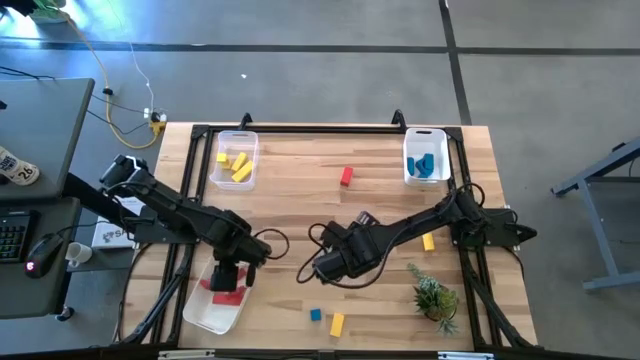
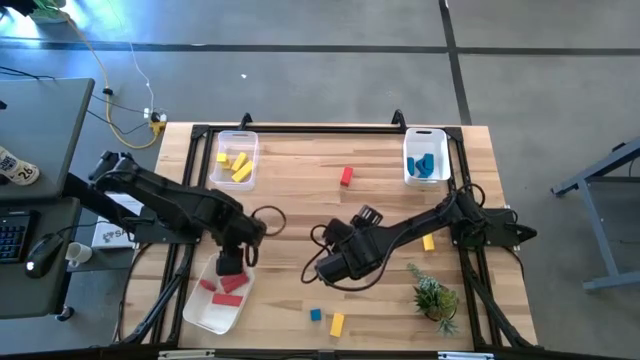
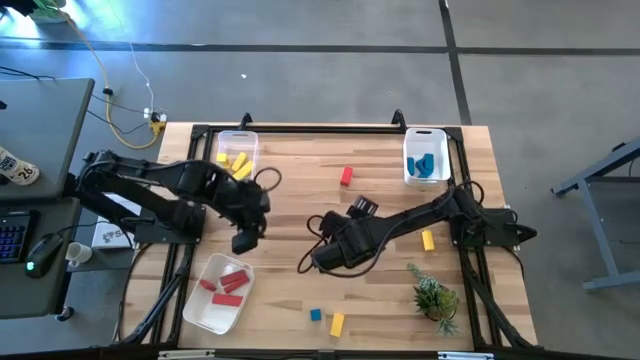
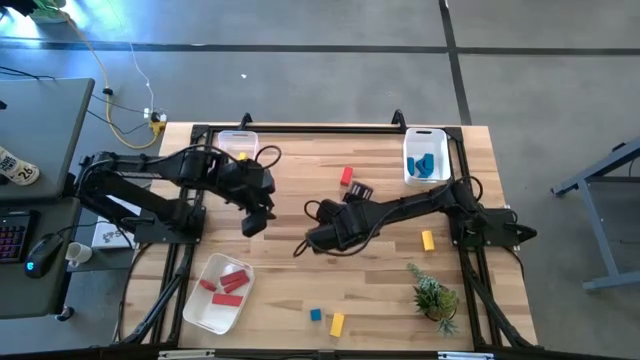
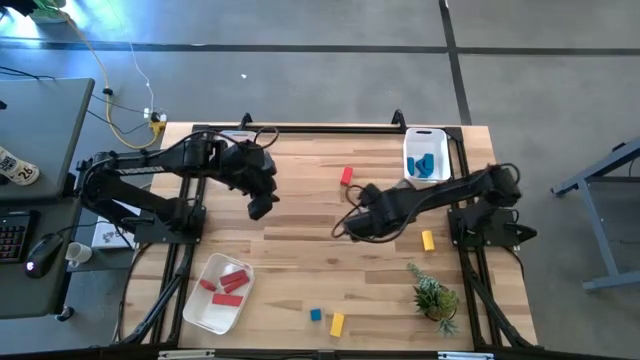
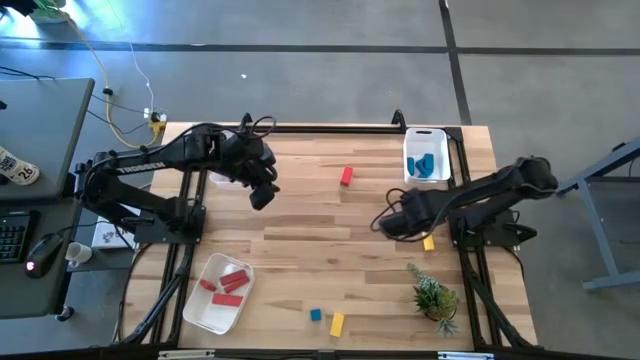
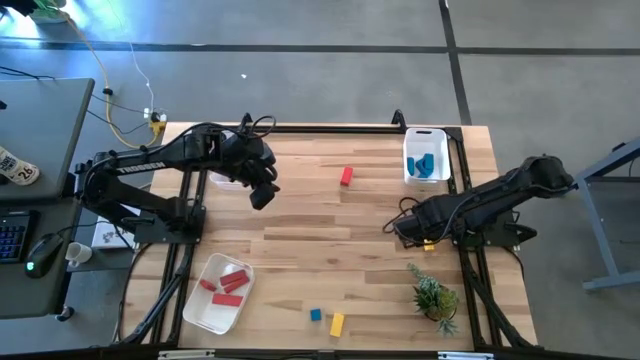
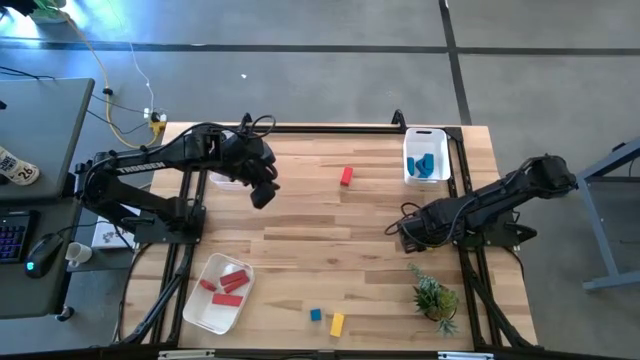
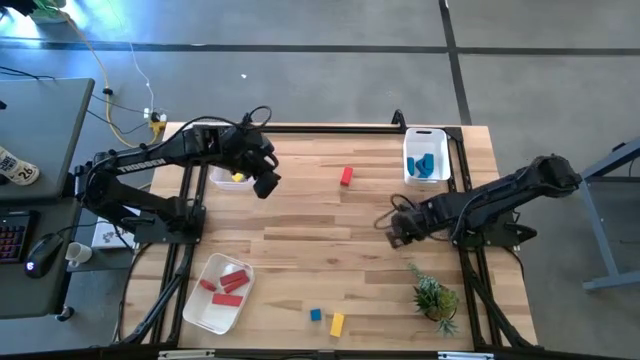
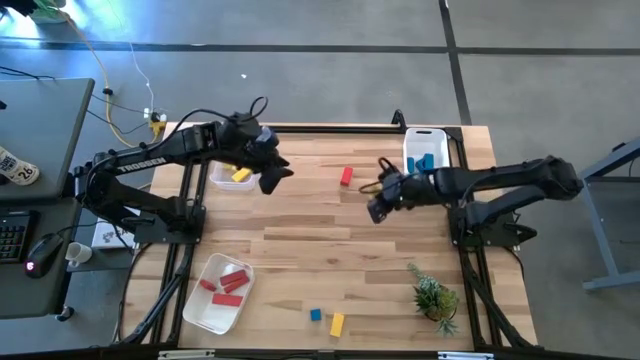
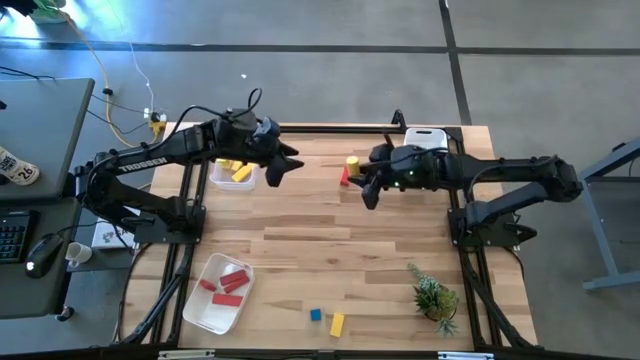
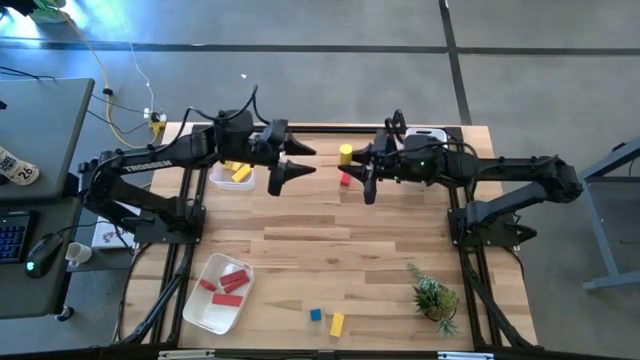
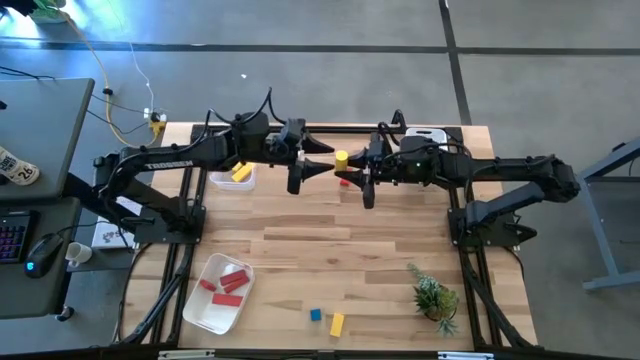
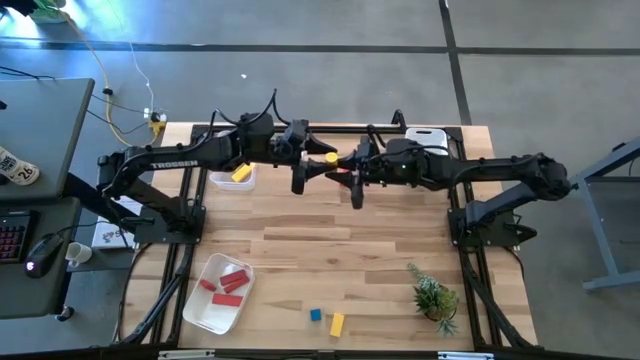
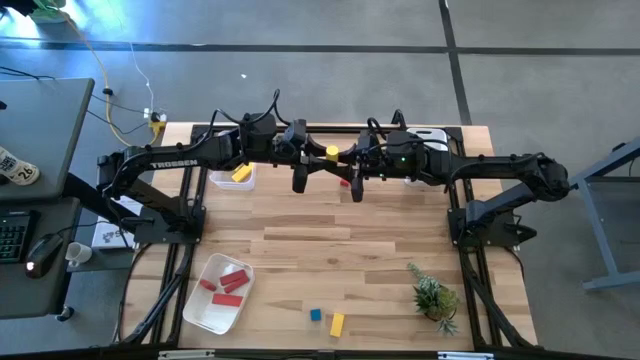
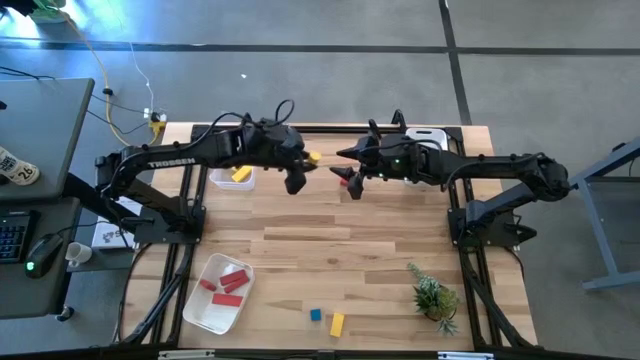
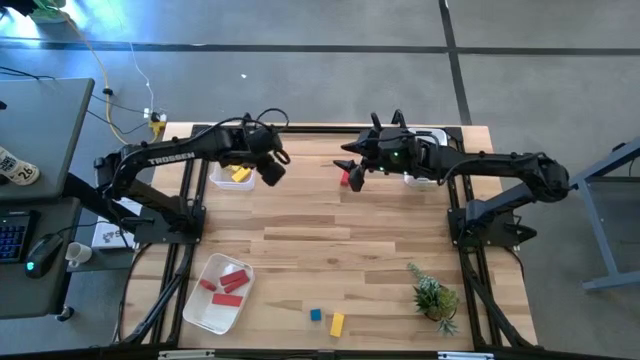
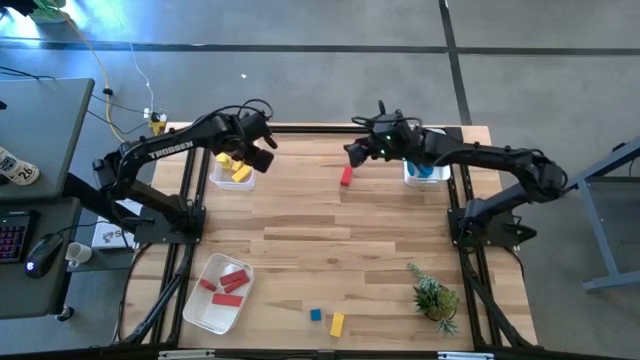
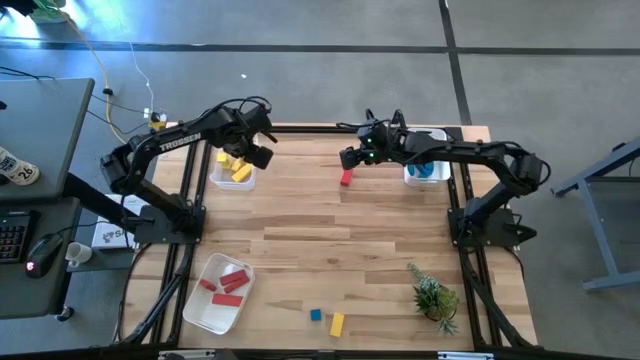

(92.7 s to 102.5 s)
Task: Sort & place blocks by color
Put the yellow block into the transparent bin

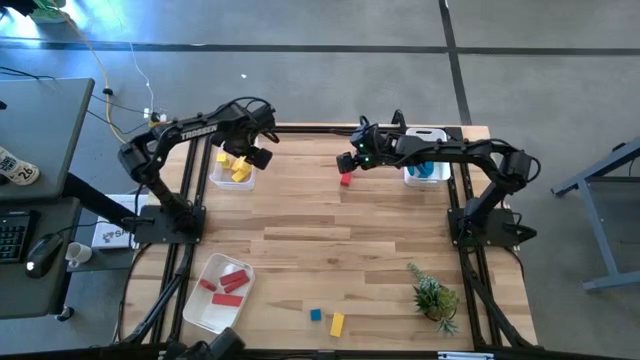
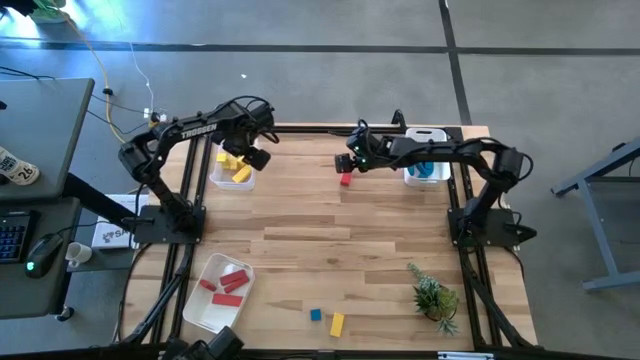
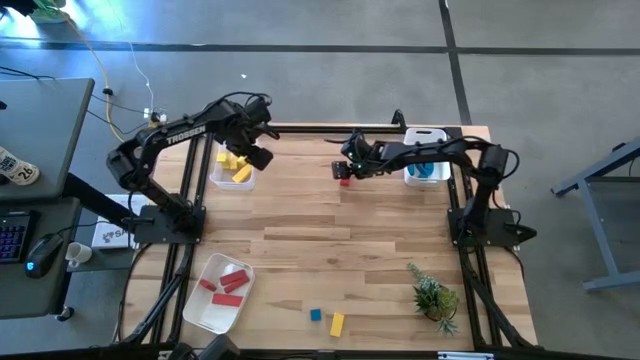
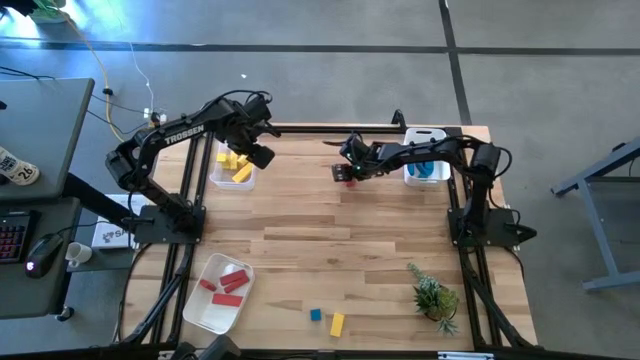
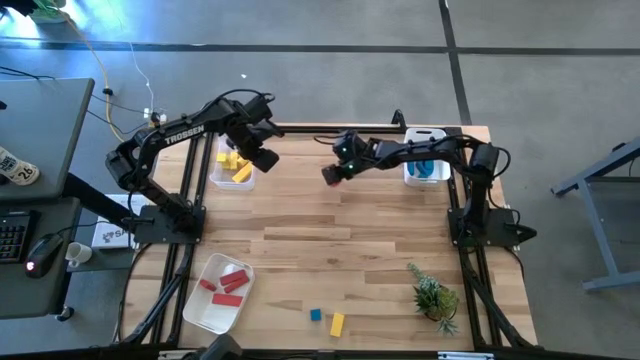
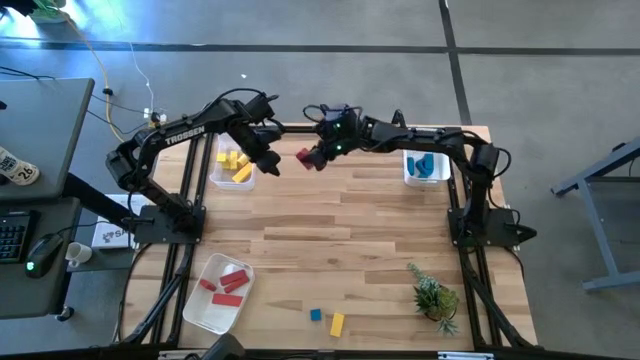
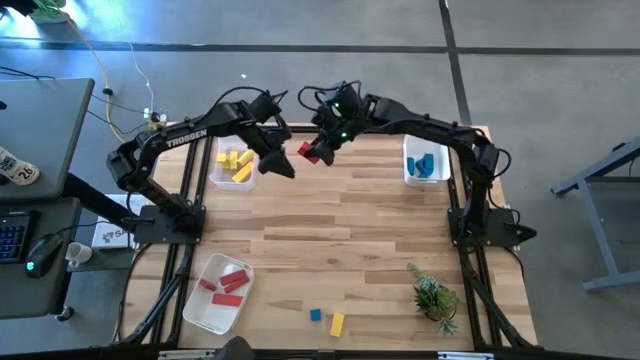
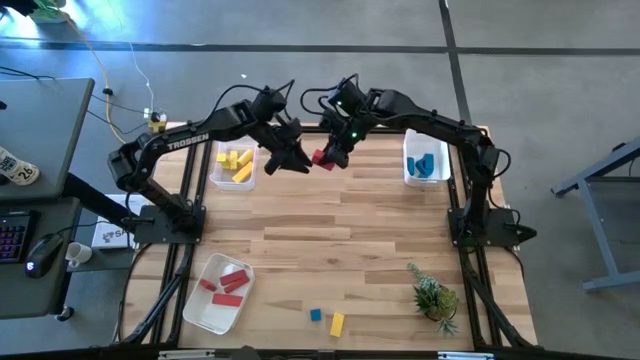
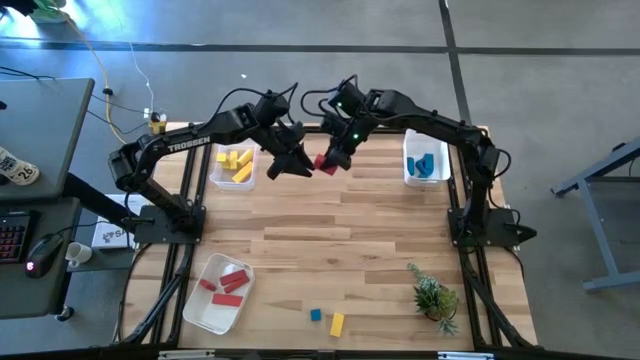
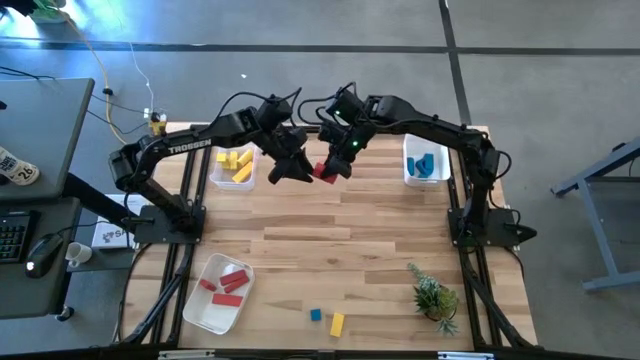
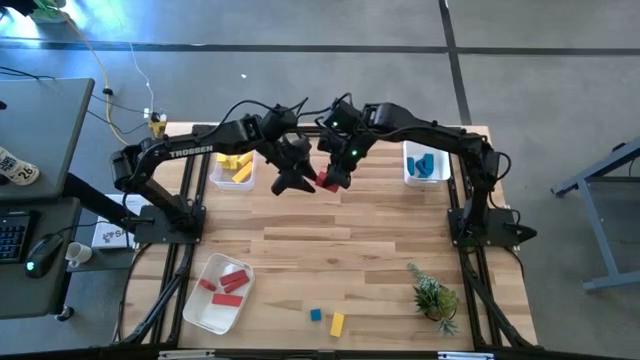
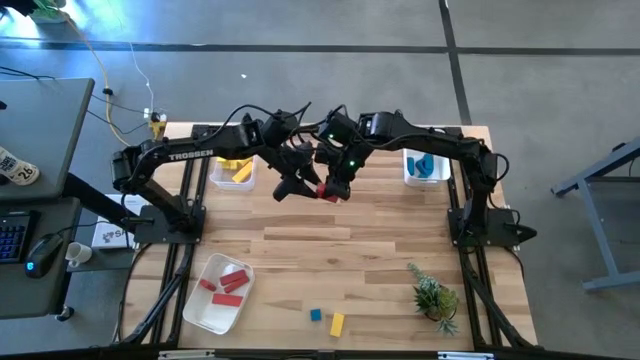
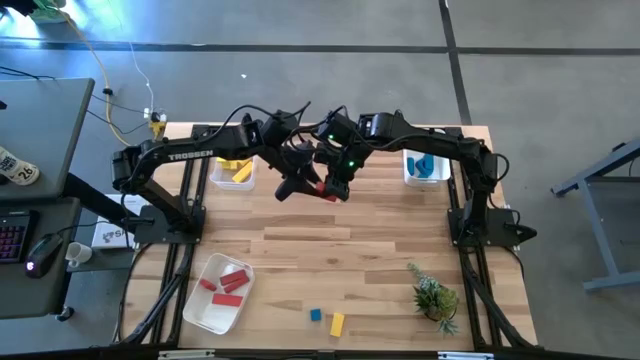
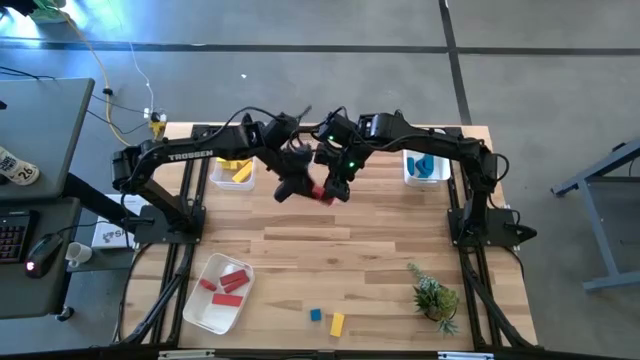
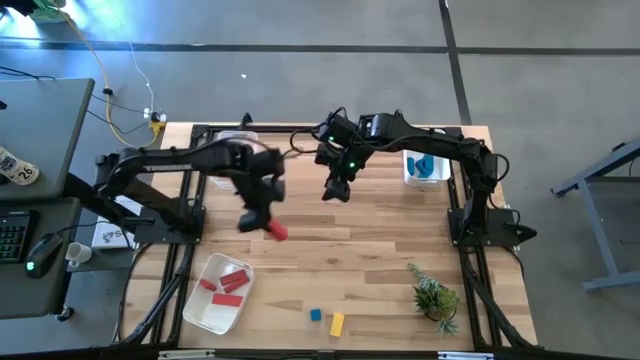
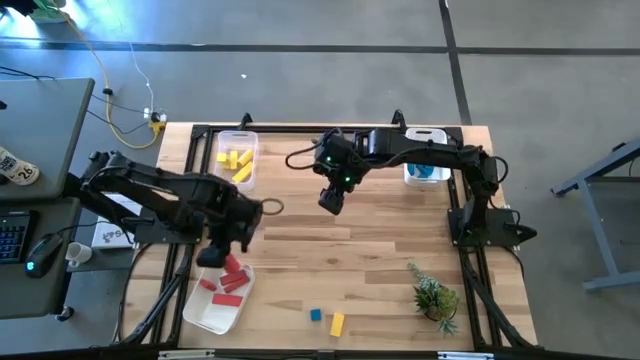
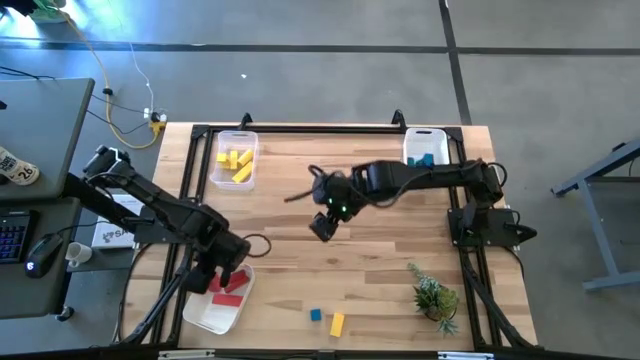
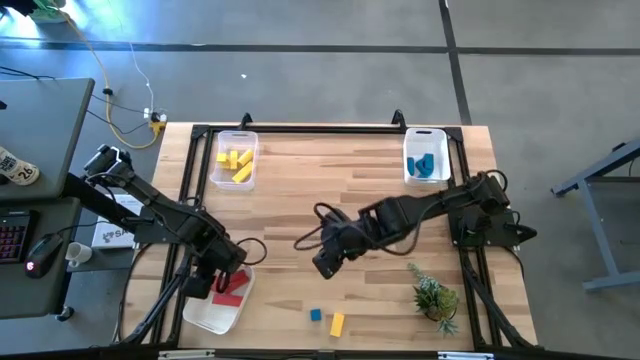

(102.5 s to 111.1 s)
Put the red block into the bottom white bin

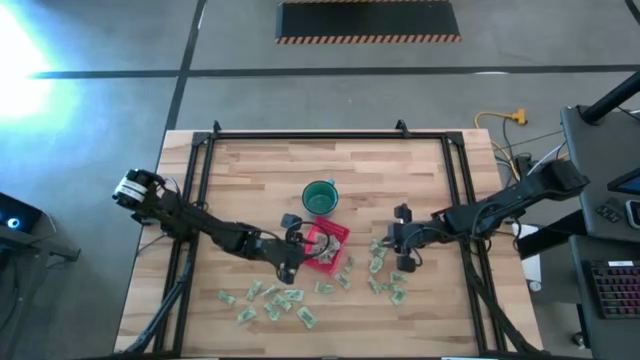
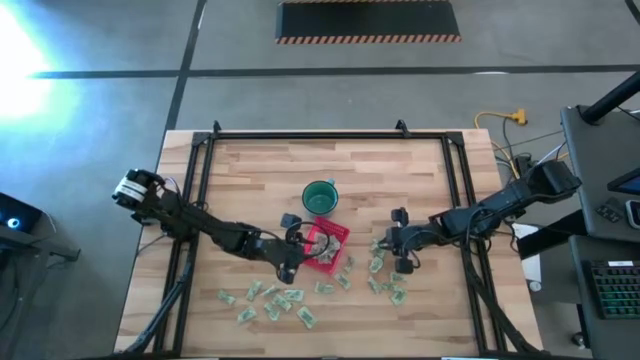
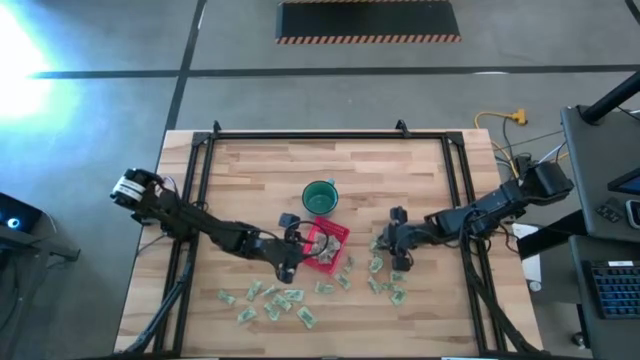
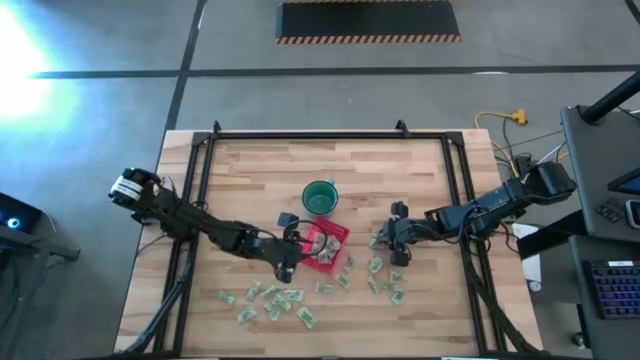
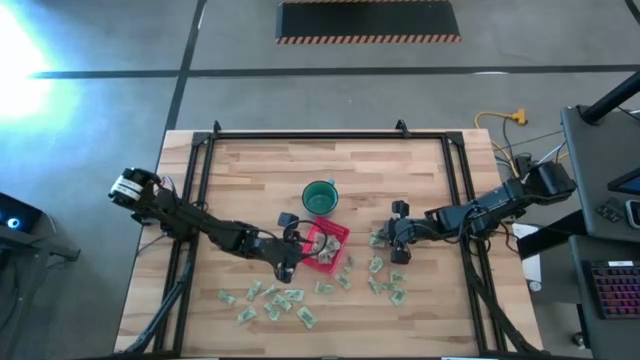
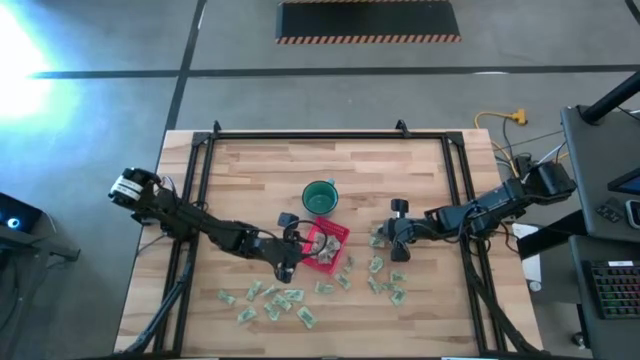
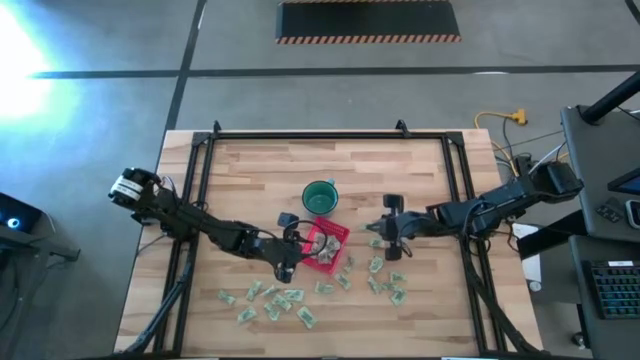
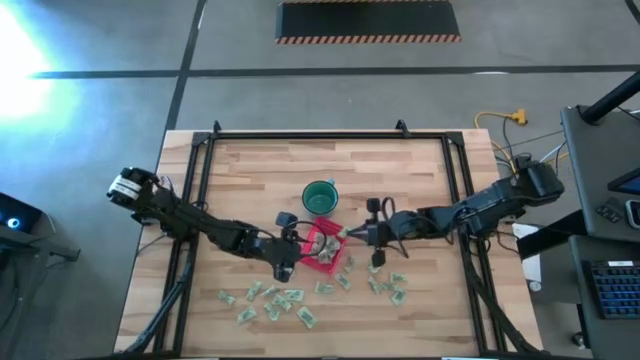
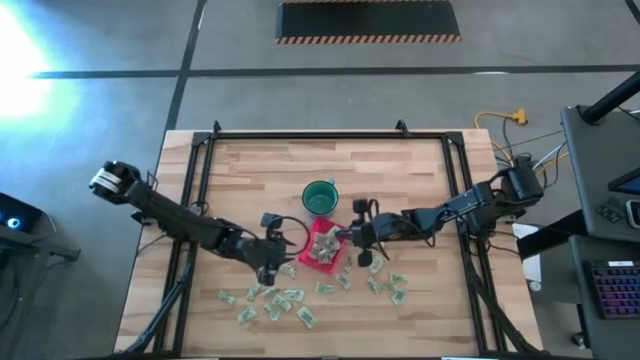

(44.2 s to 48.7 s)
Task: Pick and place items into bin
Put the light green stevia packet into the red bin
